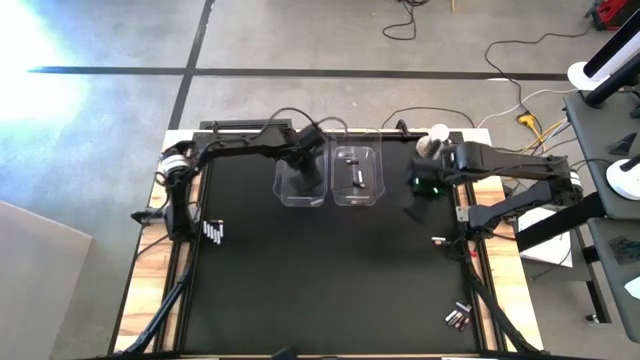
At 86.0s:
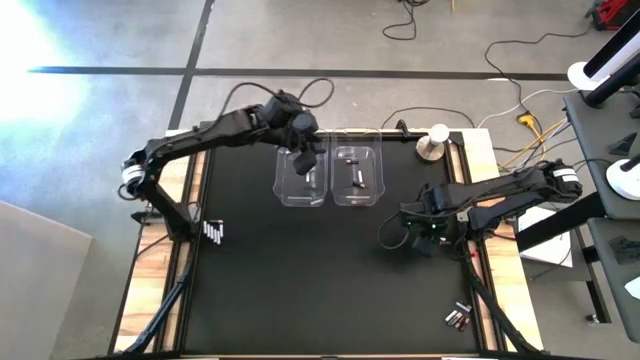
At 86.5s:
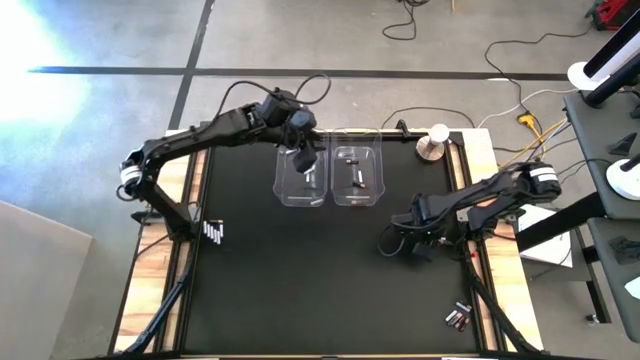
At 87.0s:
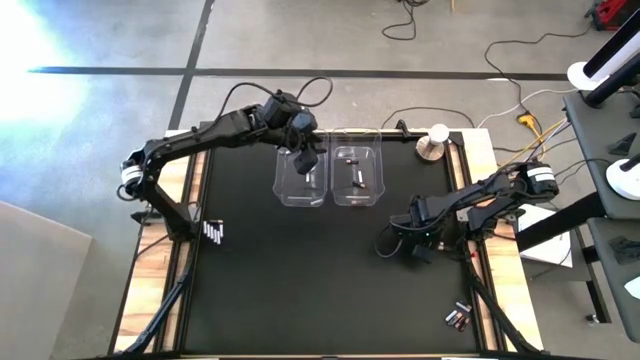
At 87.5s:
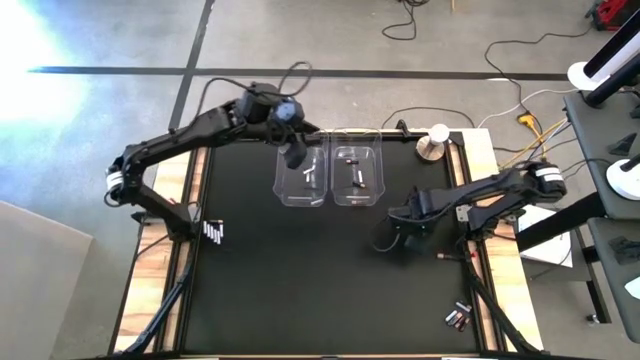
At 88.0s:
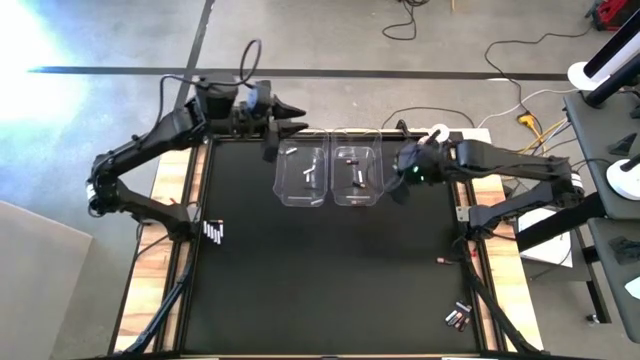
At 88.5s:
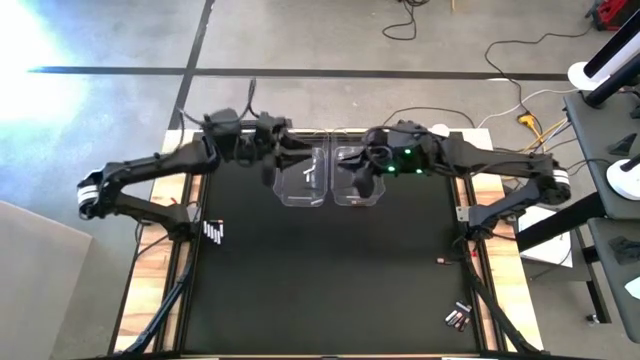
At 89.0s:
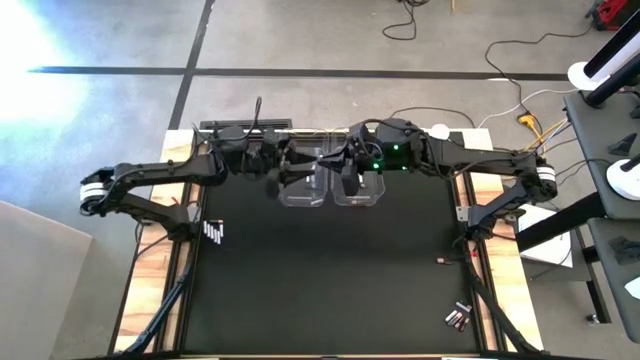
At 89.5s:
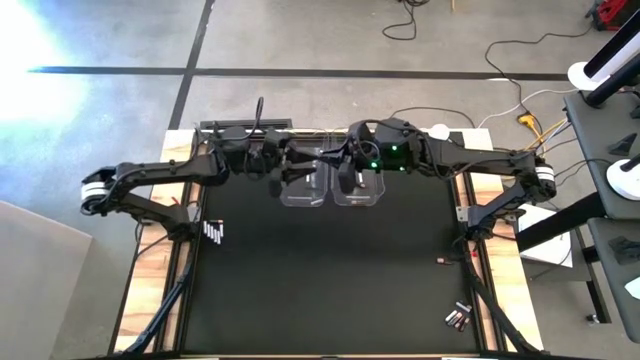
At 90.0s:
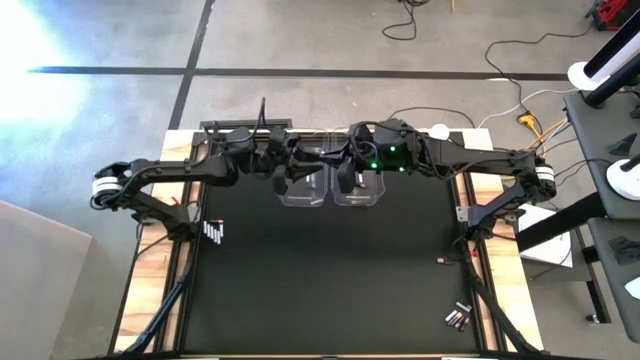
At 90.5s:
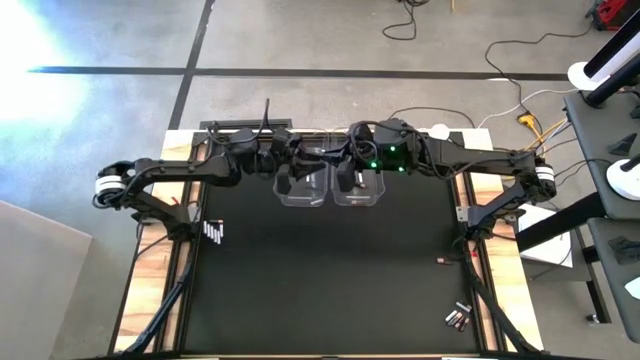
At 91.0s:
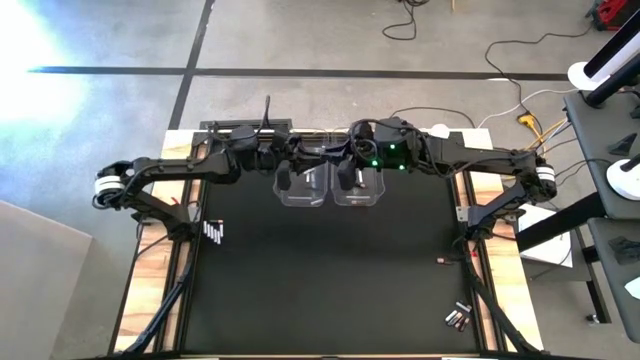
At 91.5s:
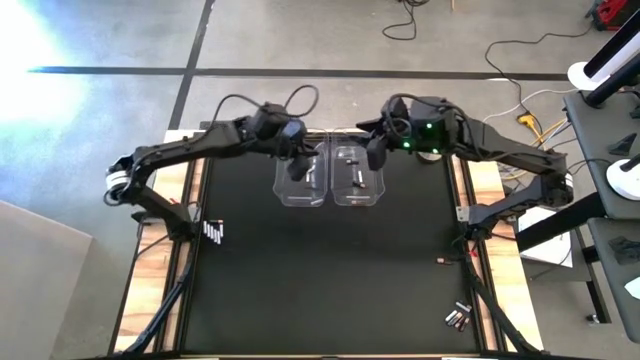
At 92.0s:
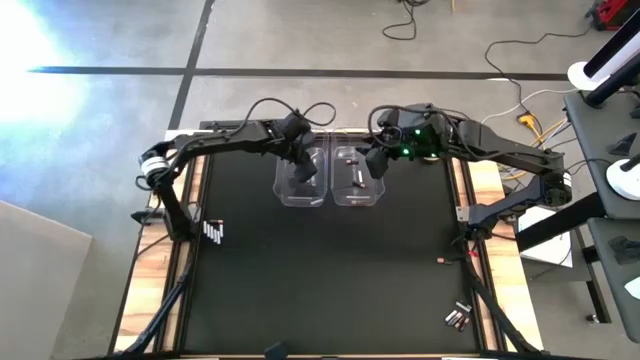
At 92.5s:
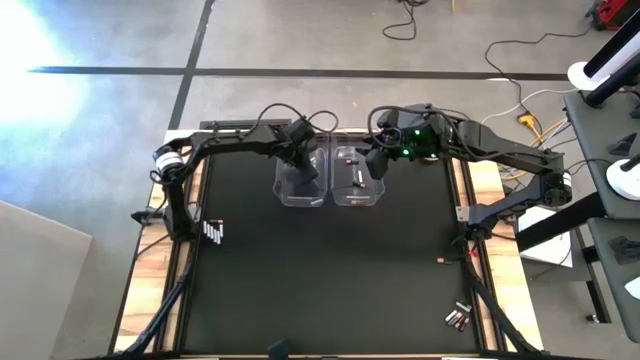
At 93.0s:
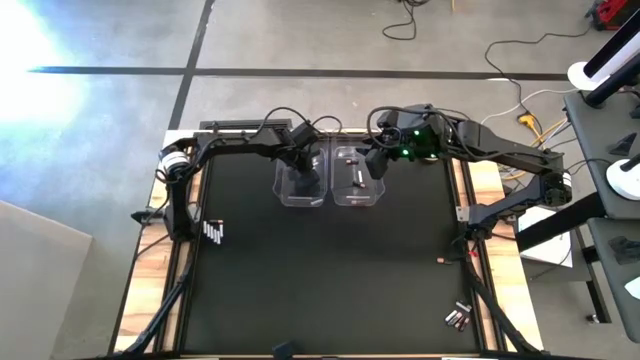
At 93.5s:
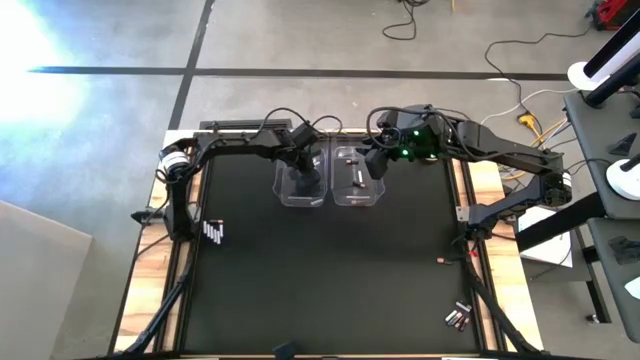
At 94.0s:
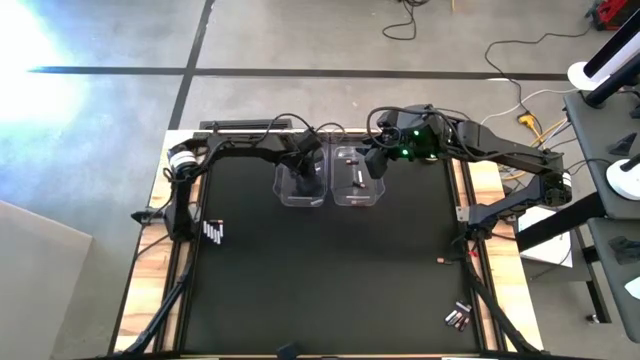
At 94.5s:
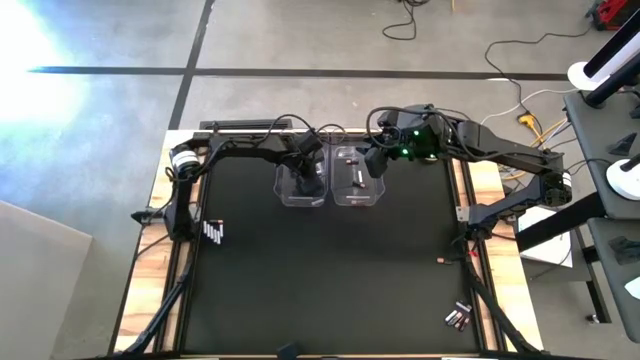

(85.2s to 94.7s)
Task: Sort batteries
Put the white battery into the left transparent bin

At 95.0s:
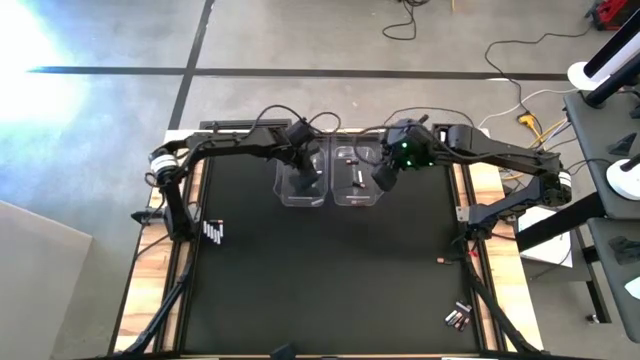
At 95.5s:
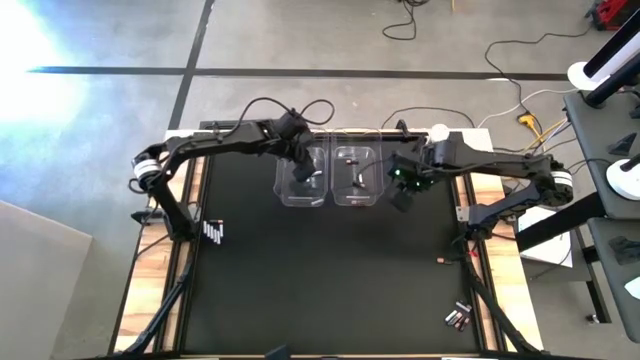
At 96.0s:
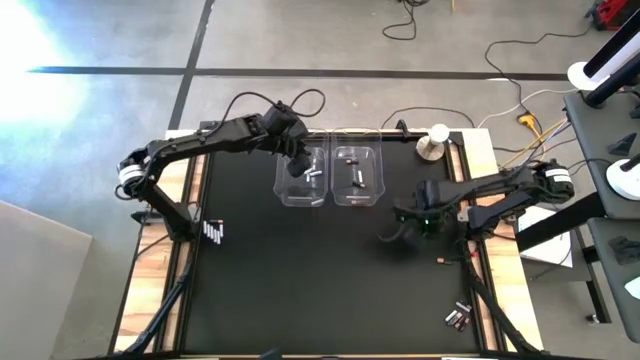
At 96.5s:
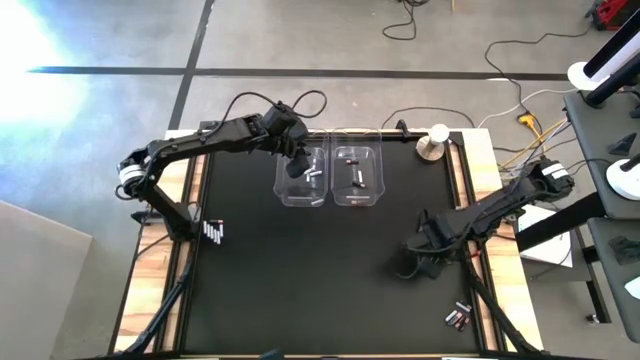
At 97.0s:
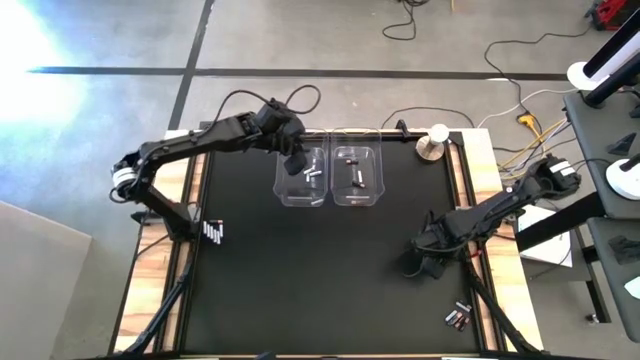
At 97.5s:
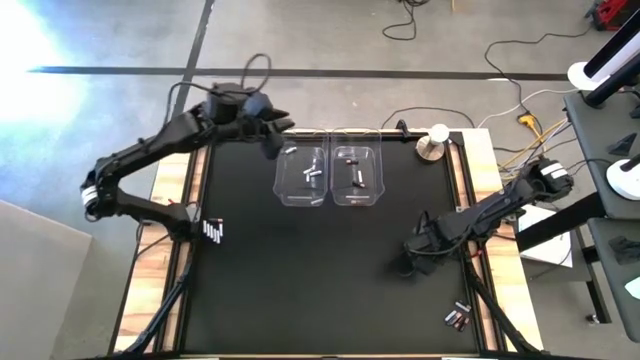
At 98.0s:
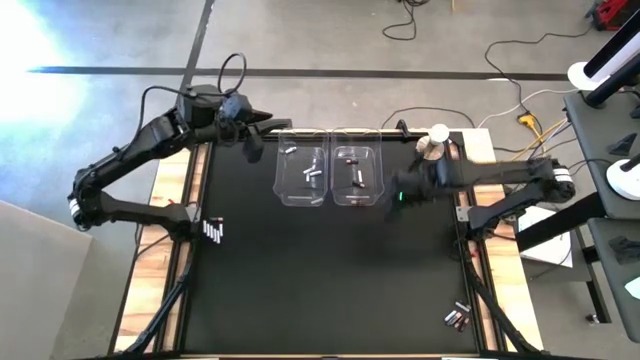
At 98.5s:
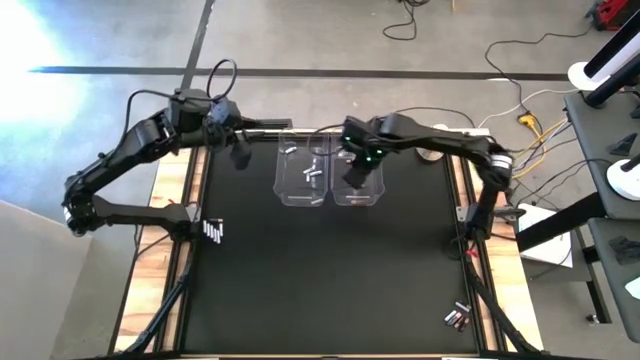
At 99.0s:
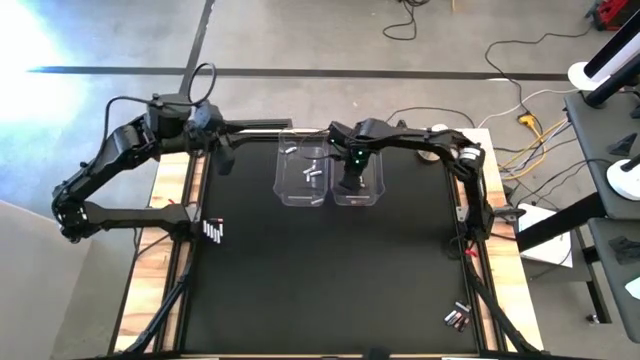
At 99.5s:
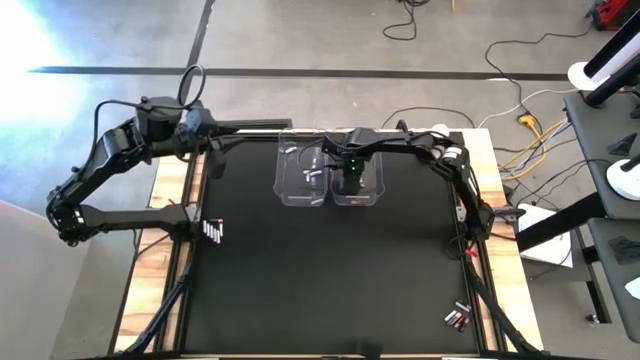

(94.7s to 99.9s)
Put the black battery into the right transparent bin

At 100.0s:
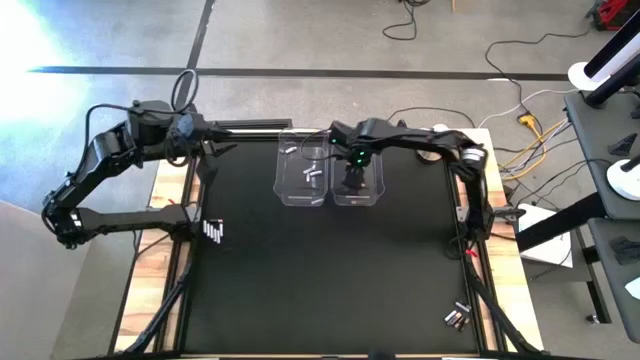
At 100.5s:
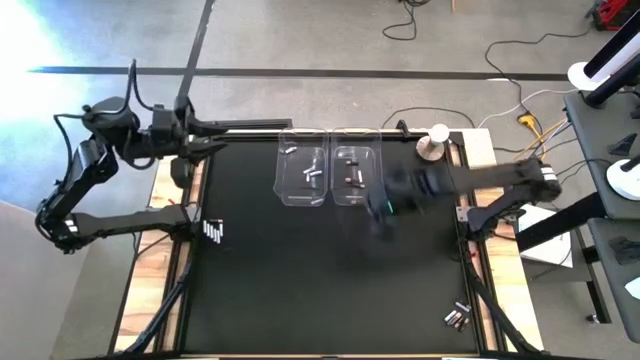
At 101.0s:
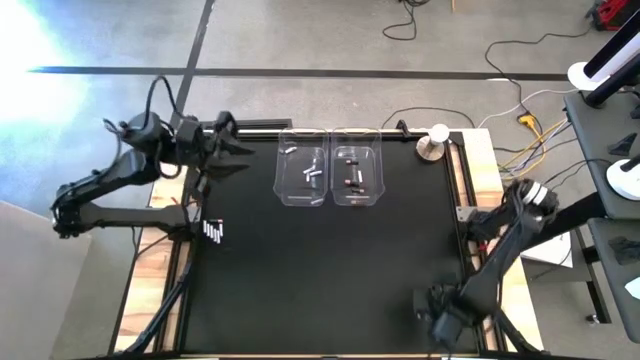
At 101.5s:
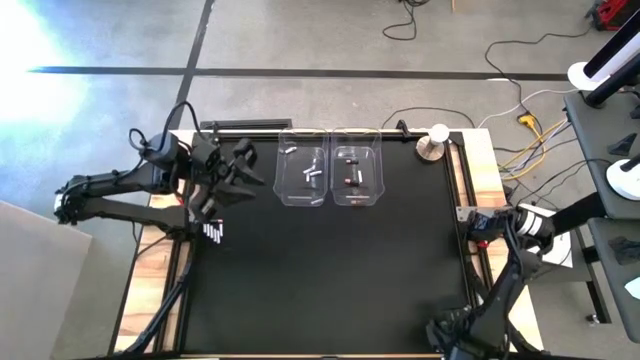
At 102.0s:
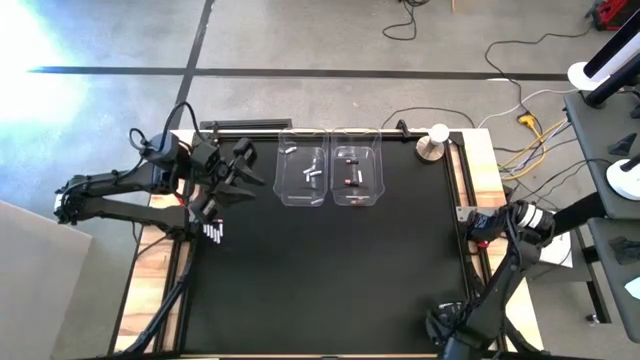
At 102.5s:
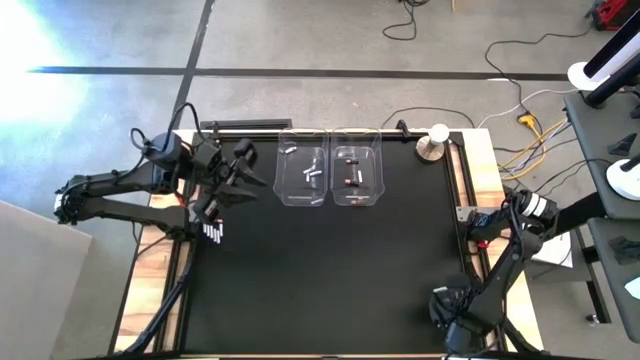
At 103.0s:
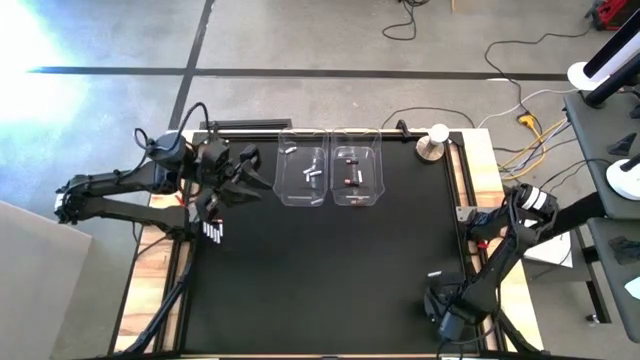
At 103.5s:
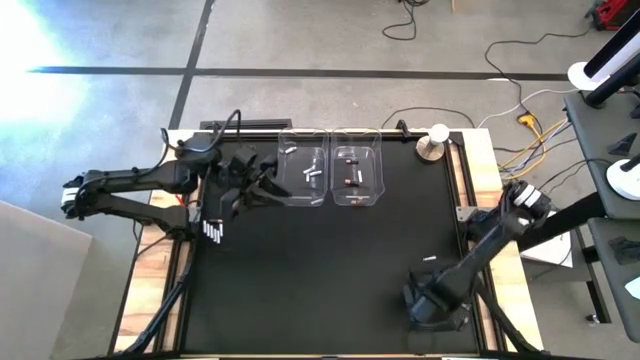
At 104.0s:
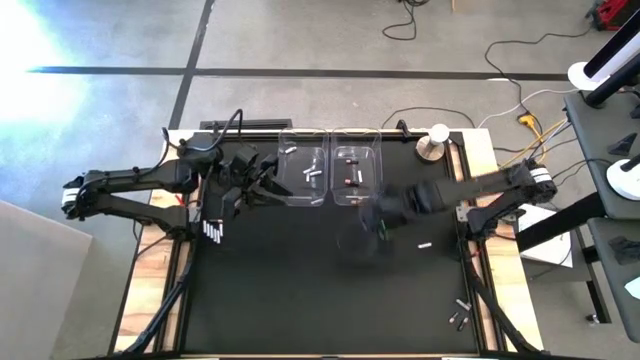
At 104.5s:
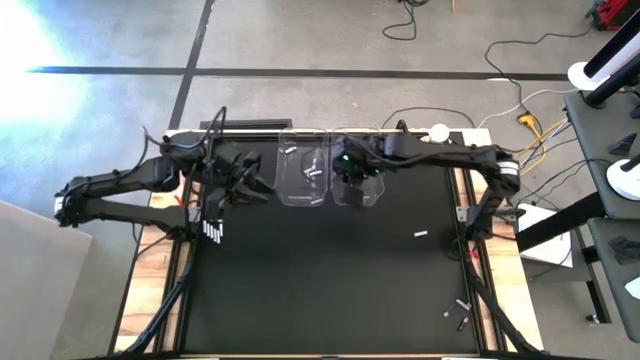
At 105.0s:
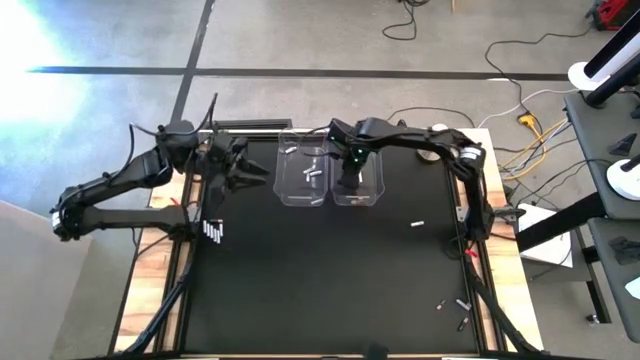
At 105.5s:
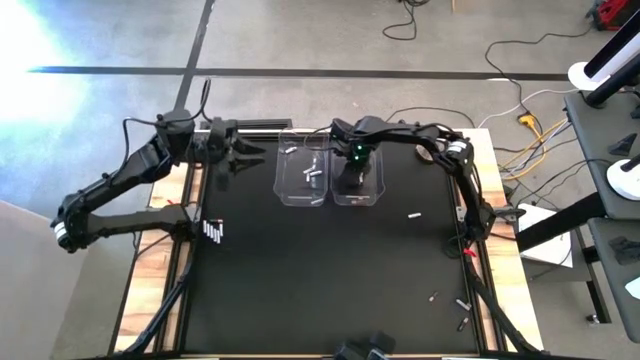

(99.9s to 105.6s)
Put the black battery into the right transparent bin

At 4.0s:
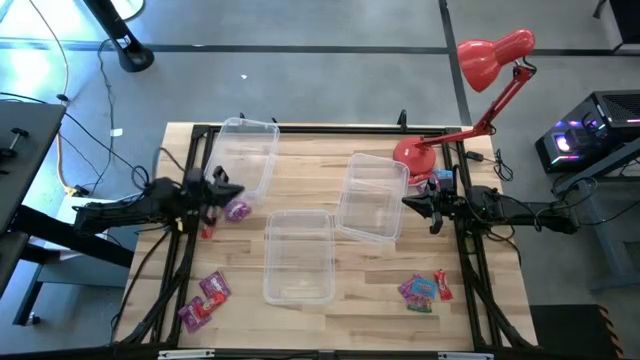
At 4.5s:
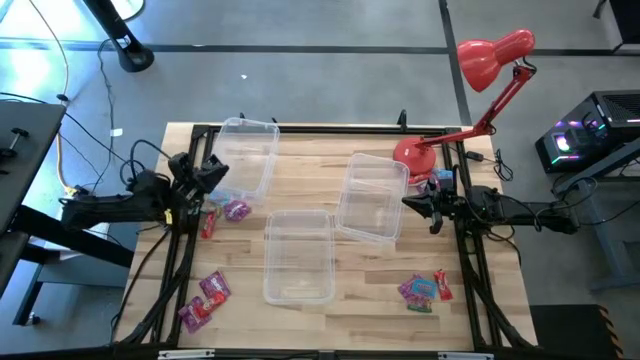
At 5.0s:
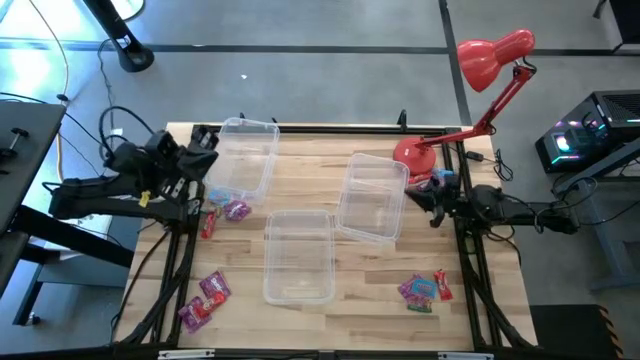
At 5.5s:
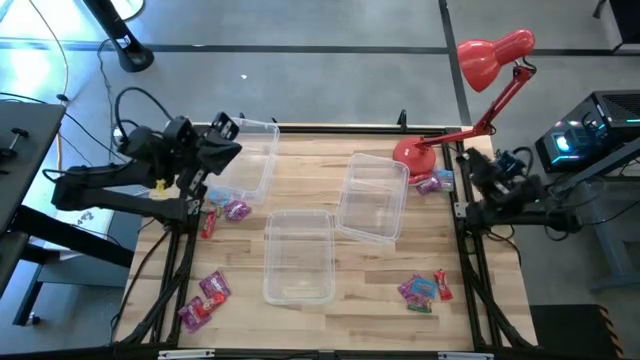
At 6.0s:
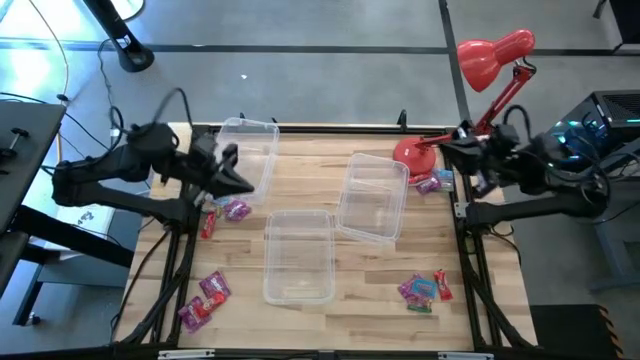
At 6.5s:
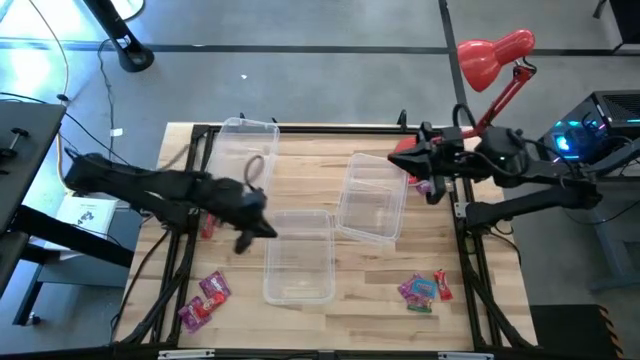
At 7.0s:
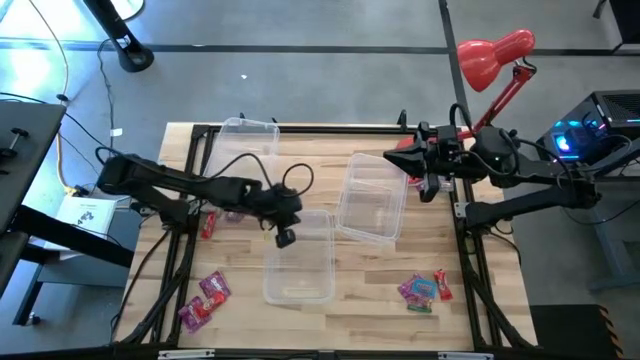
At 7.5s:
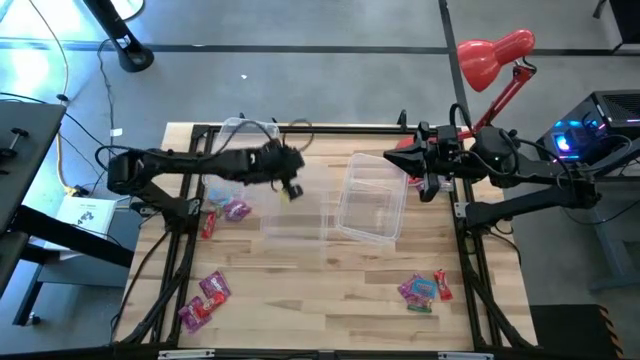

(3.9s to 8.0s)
Task: Sort candy
Move the center transparent bin to the top center of the table
